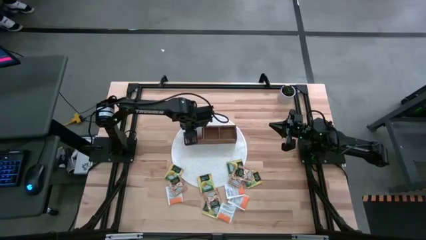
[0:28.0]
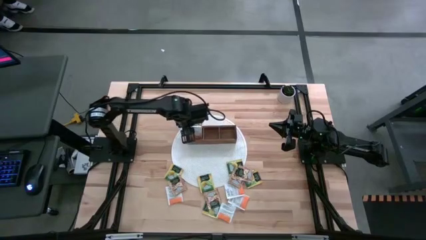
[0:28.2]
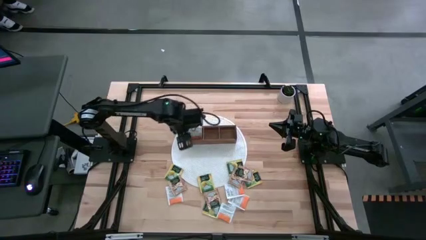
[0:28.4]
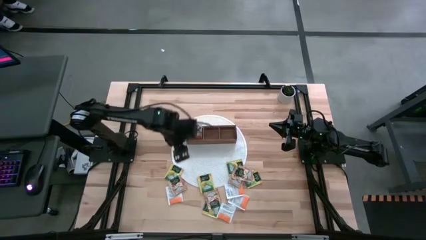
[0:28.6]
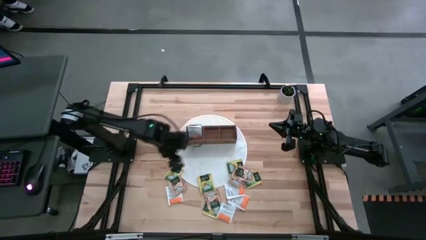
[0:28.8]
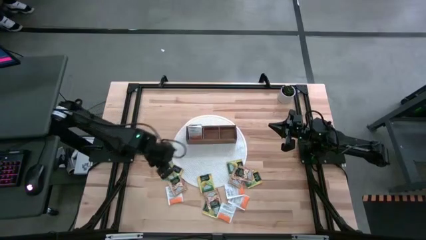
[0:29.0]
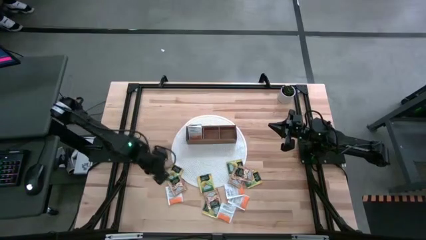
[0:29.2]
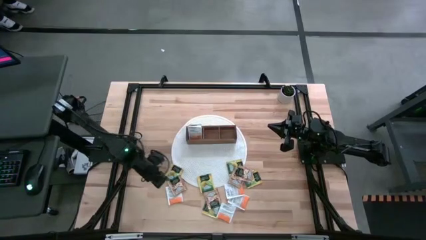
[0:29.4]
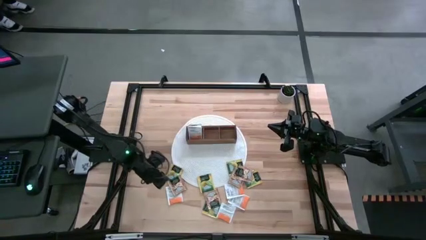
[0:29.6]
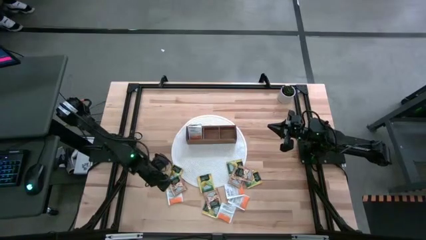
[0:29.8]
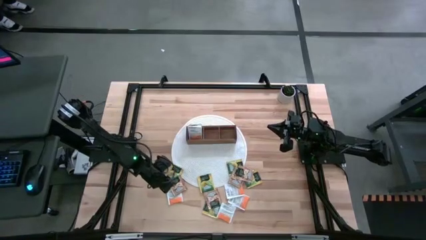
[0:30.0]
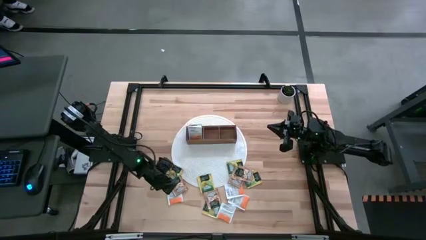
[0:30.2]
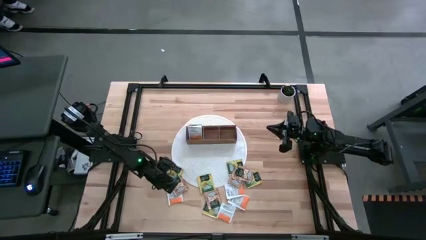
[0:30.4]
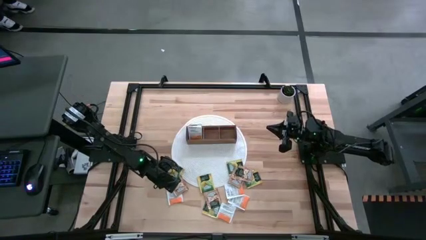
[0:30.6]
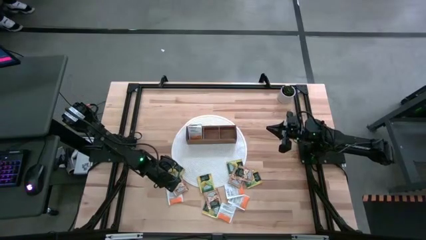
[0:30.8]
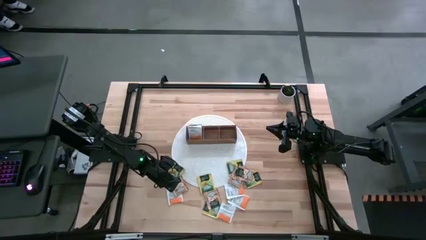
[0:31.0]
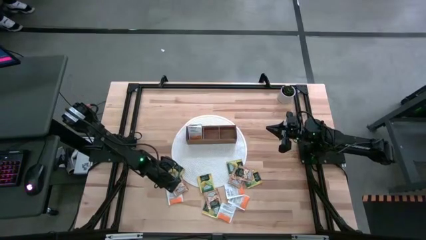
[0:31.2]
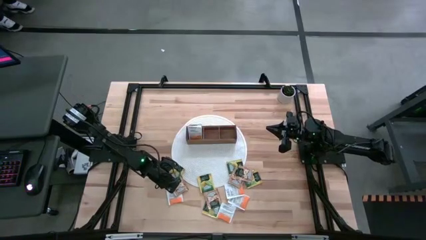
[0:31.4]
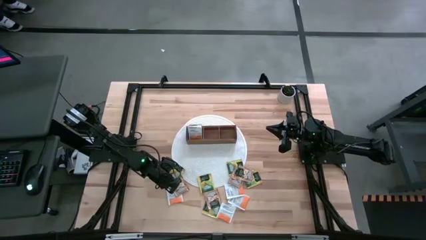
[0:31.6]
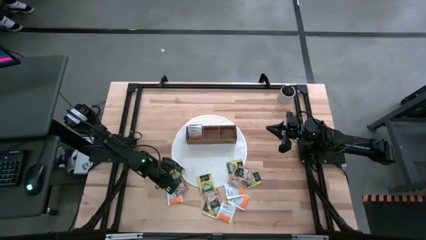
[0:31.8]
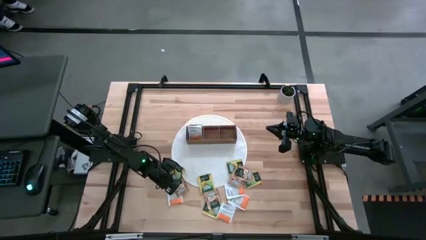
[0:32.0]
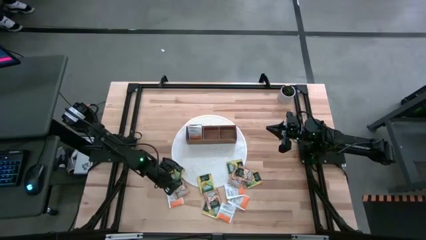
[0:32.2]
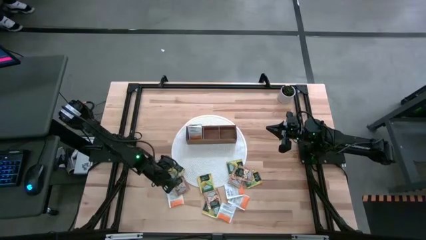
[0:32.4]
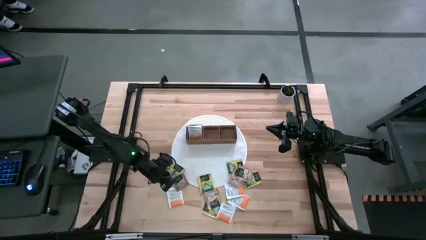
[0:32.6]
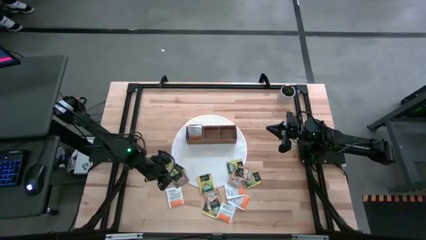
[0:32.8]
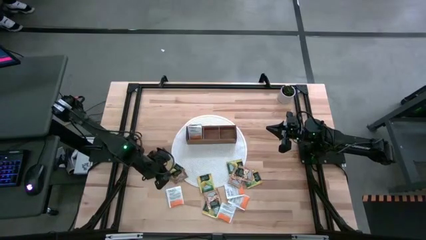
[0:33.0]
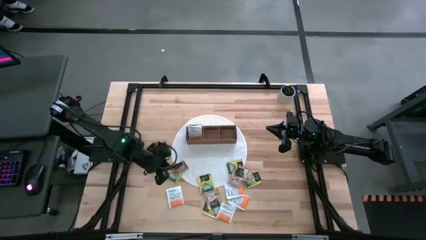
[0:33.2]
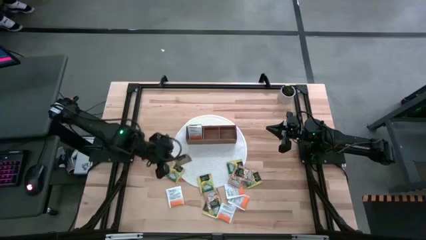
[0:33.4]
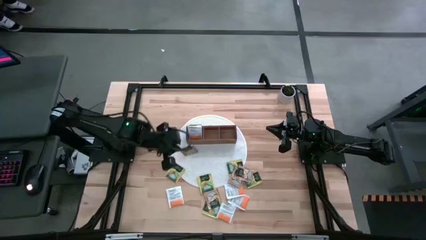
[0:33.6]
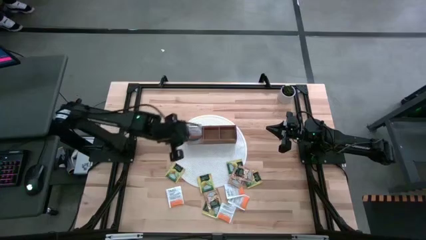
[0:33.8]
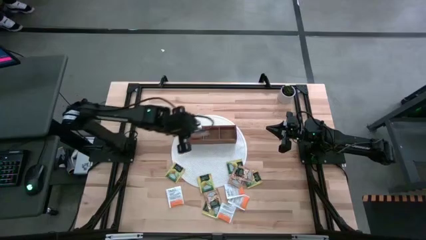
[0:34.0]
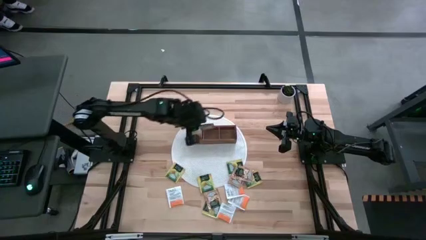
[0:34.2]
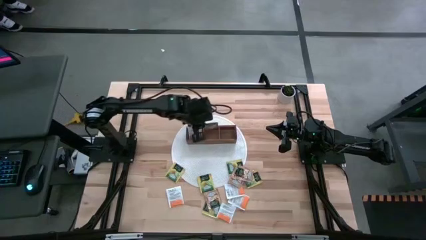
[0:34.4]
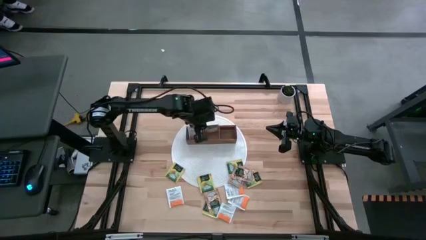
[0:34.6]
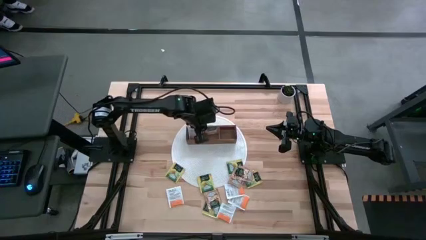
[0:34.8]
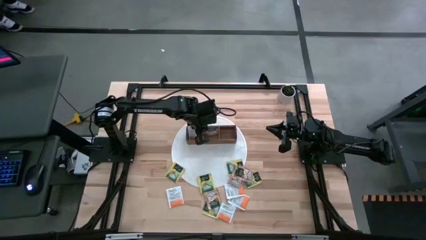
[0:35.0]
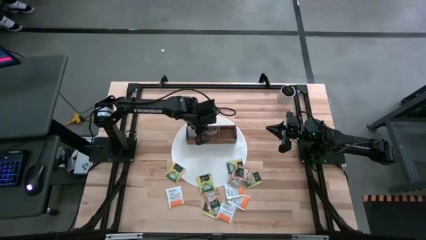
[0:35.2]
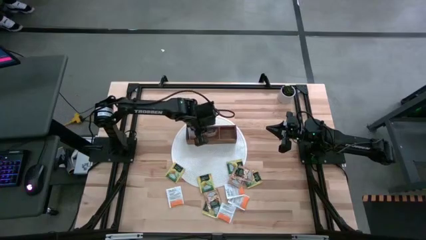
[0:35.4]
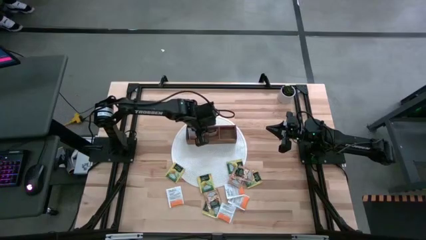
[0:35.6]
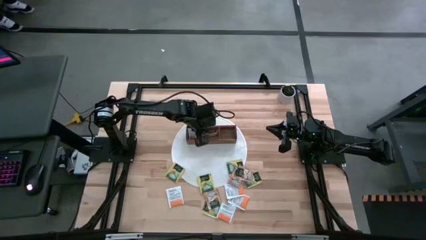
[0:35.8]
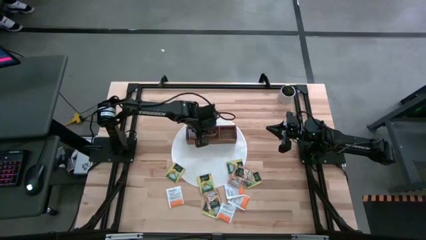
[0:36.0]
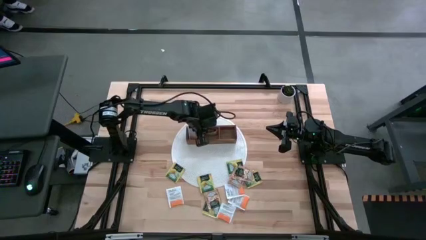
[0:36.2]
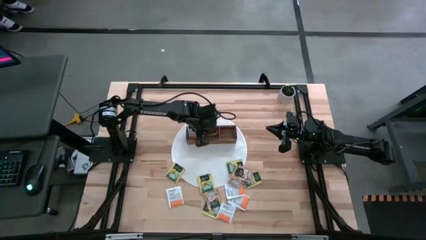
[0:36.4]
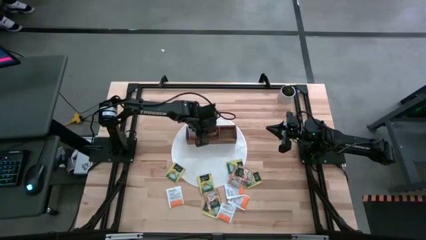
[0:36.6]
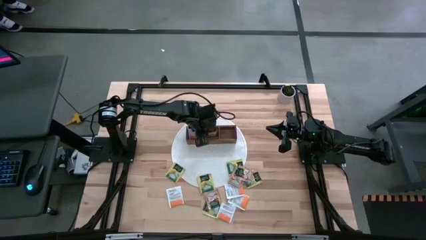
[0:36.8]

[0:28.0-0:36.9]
Task: Pick & Place Tea
Put the brown tea bag into the middle section of the wooden organizer

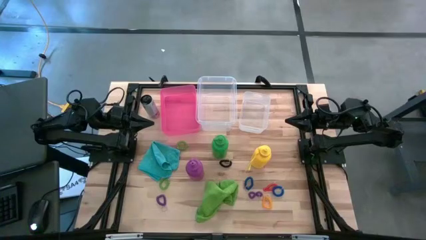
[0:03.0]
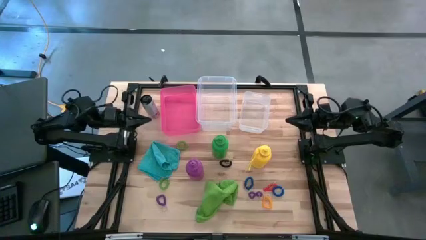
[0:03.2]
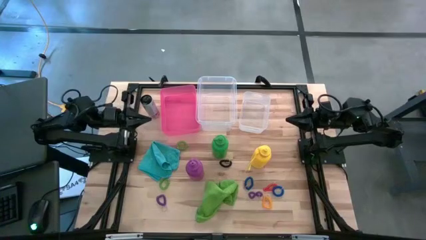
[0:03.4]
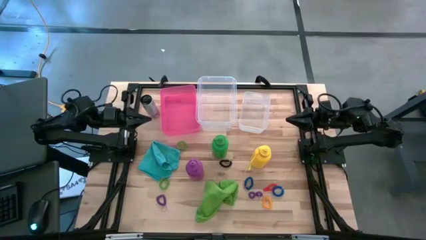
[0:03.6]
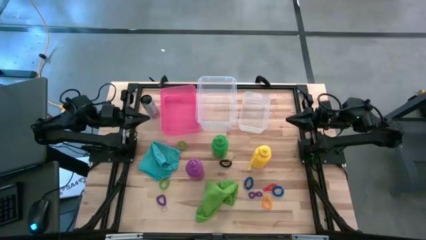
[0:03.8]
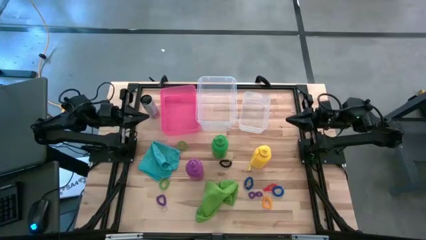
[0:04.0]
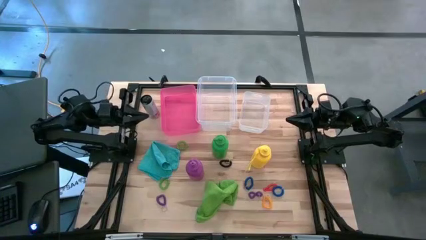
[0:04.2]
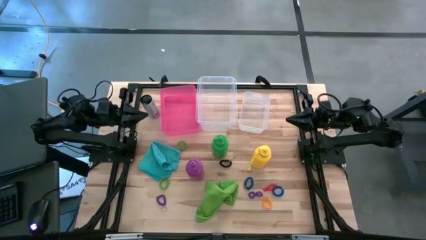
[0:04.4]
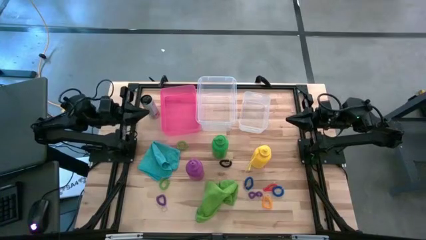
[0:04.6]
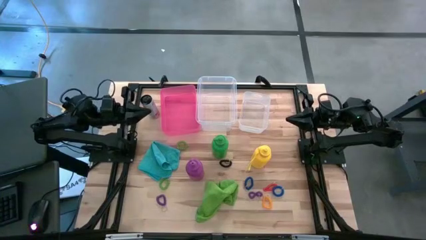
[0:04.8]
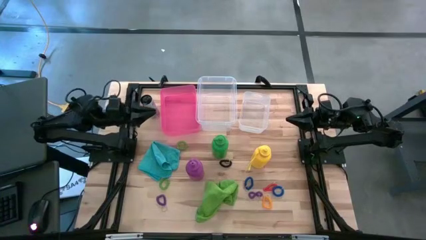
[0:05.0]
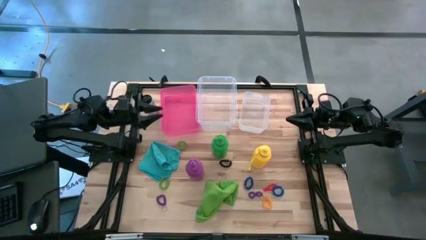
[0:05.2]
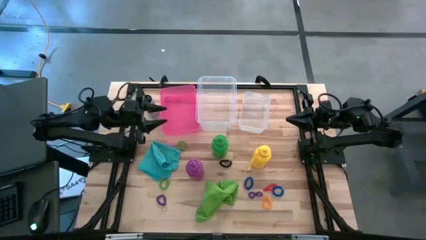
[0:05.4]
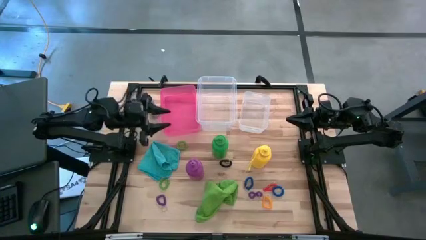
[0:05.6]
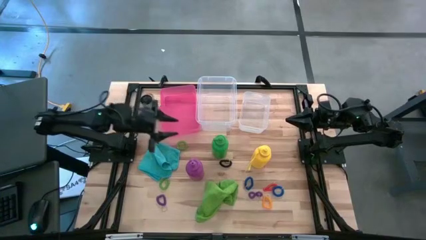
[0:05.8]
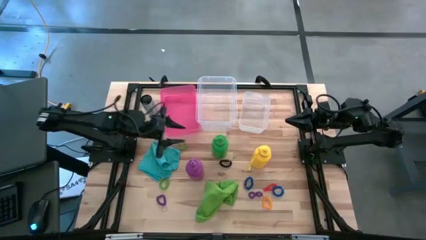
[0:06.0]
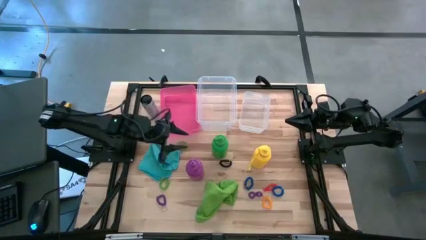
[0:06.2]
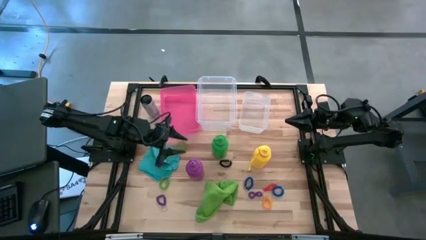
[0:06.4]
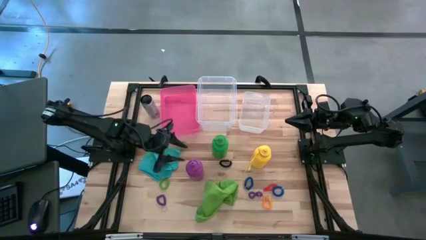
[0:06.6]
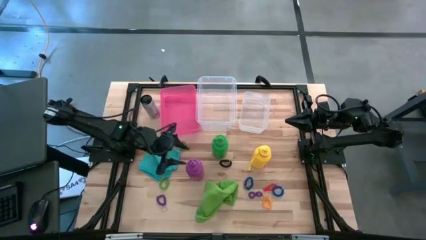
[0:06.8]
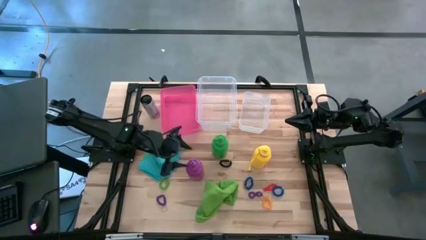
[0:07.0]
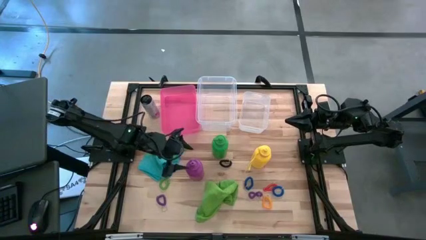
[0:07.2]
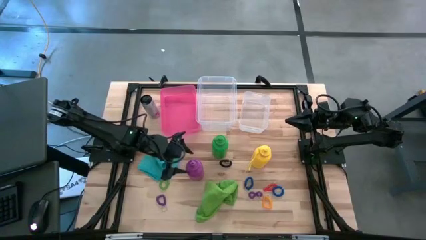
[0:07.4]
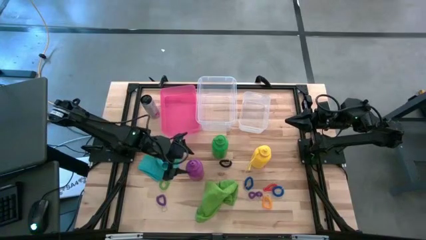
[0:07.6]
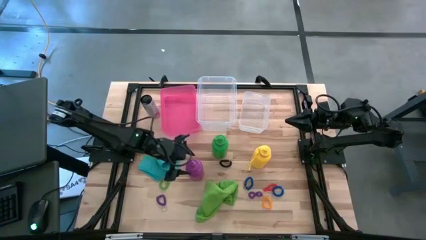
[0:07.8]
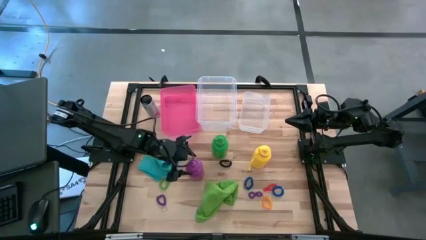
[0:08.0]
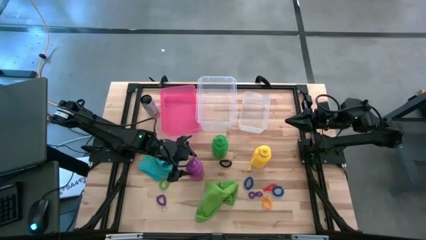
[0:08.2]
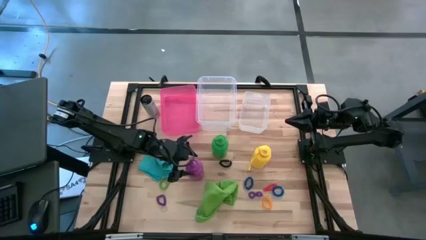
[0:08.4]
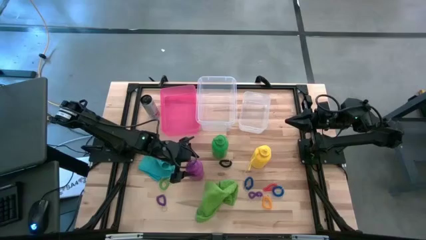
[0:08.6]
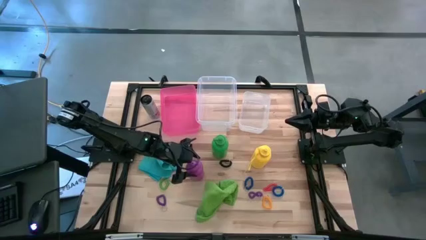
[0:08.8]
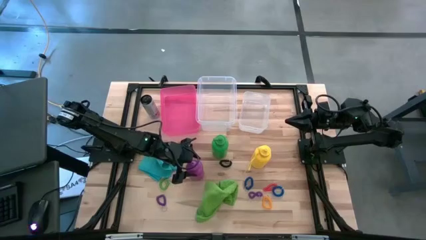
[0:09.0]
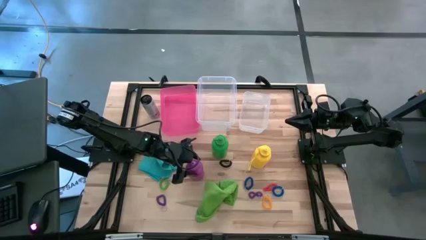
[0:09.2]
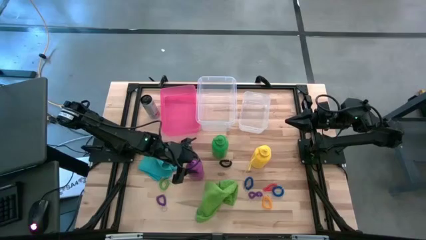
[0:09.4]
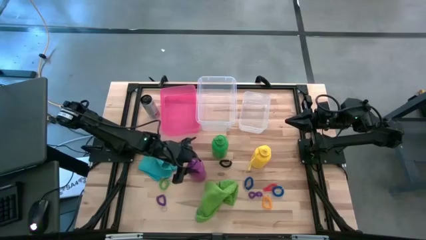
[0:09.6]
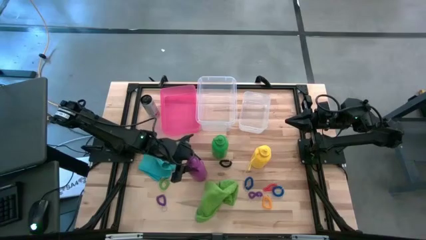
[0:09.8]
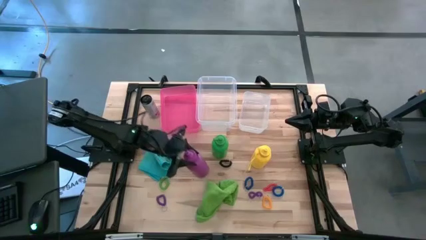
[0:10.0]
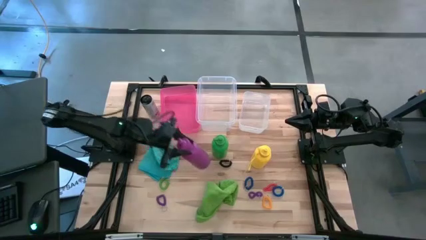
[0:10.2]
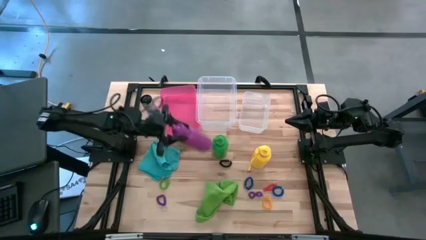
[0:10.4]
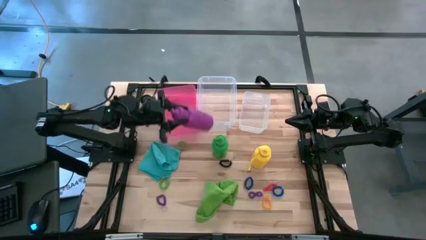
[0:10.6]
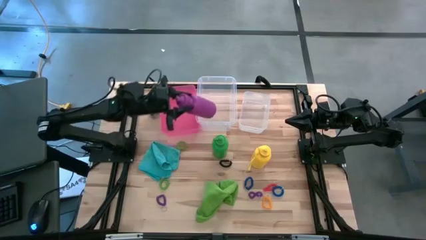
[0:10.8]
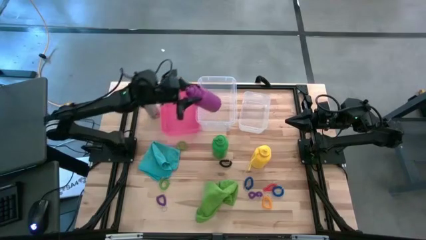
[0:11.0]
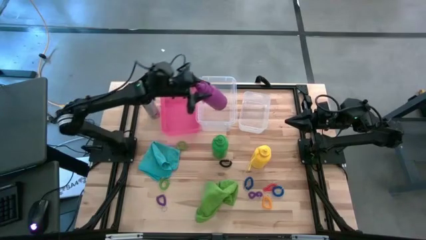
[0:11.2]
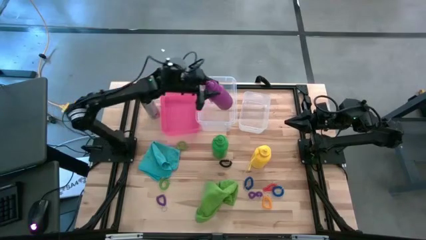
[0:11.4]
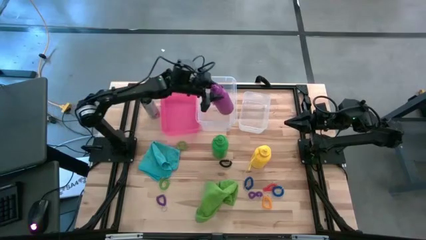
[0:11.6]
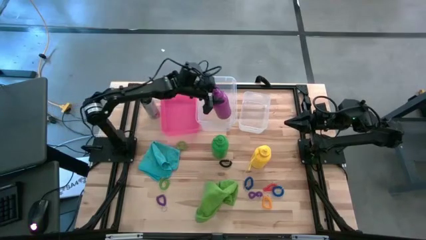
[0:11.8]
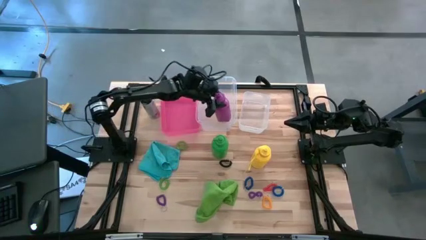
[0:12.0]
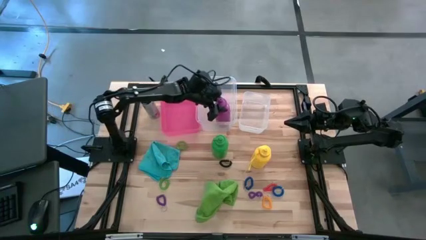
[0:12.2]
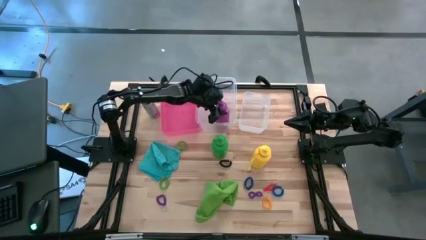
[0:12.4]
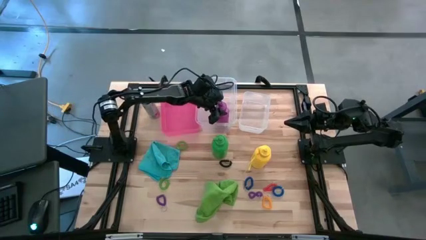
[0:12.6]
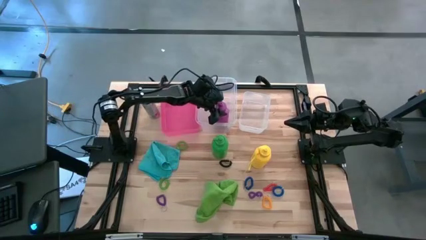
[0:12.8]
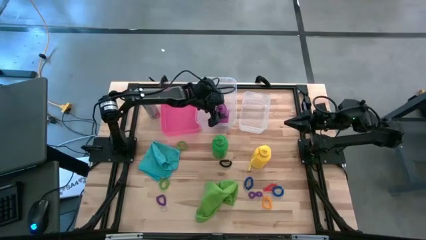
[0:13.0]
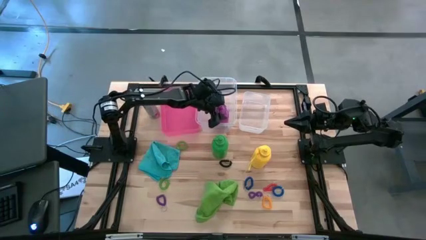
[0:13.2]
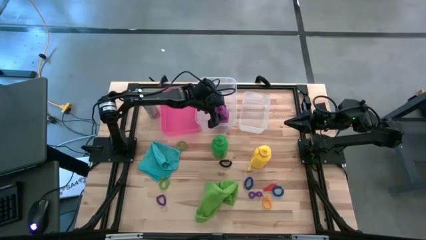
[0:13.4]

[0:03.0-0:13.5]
Task: Pick & Place Sports Items
Put the purple water bottle into the left transparent bin
